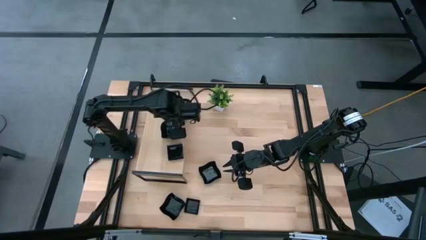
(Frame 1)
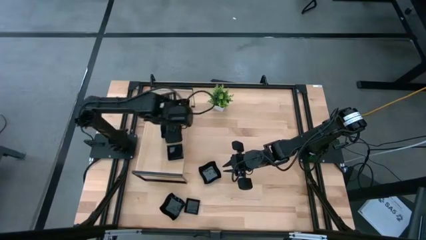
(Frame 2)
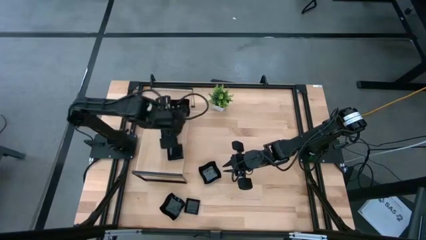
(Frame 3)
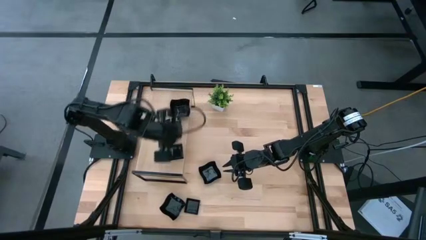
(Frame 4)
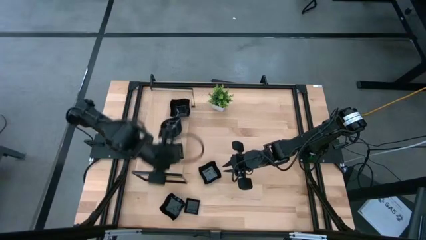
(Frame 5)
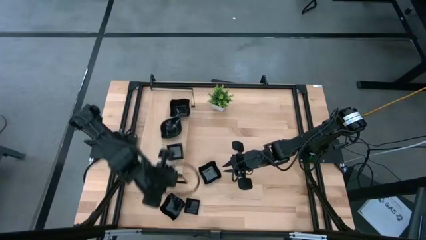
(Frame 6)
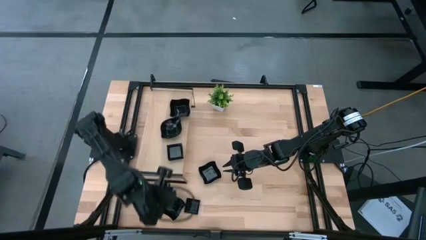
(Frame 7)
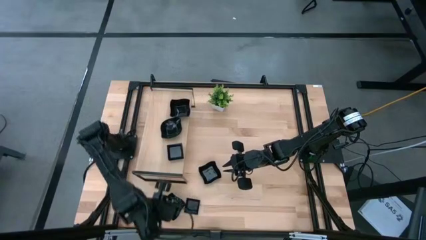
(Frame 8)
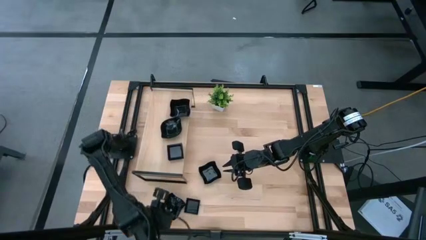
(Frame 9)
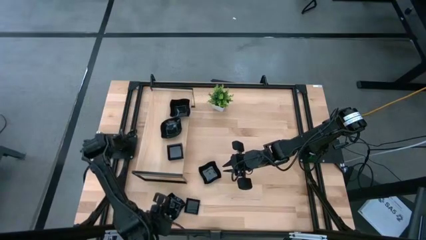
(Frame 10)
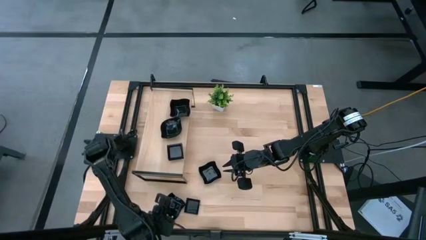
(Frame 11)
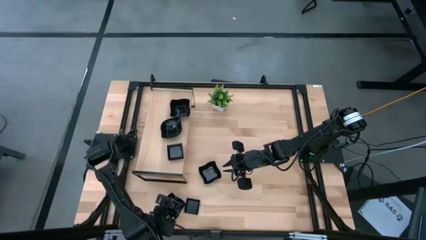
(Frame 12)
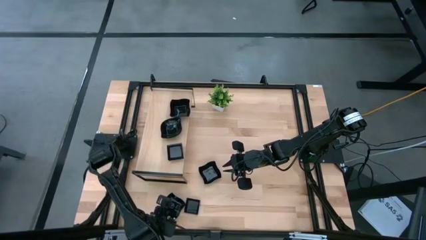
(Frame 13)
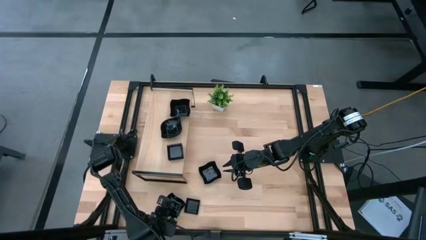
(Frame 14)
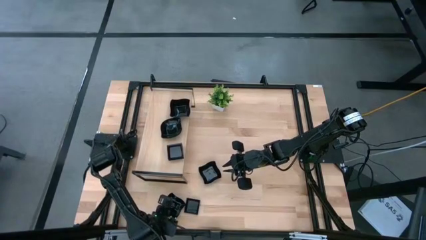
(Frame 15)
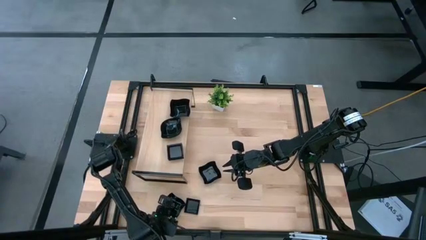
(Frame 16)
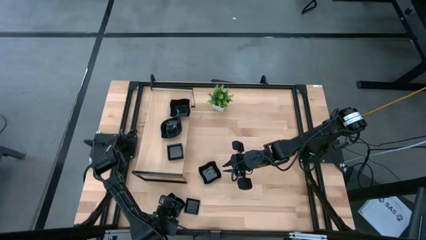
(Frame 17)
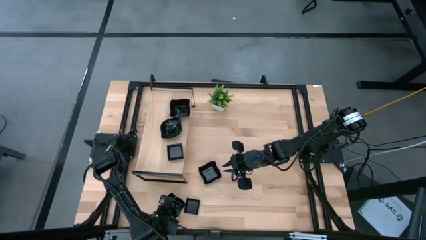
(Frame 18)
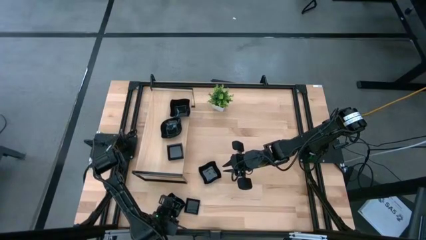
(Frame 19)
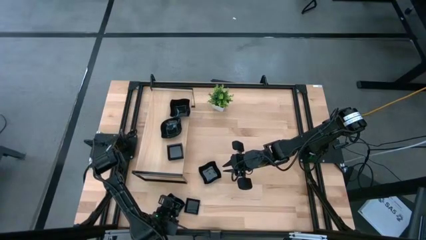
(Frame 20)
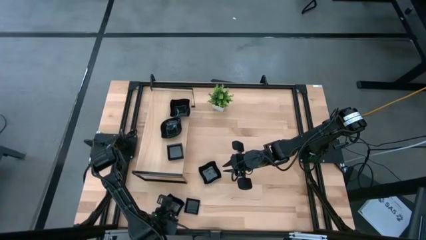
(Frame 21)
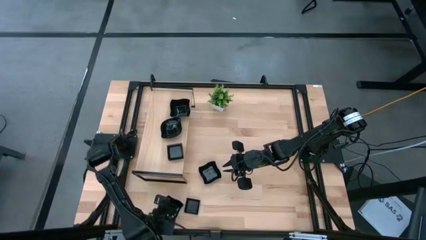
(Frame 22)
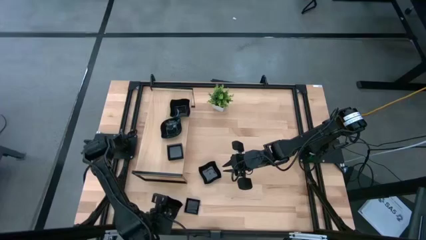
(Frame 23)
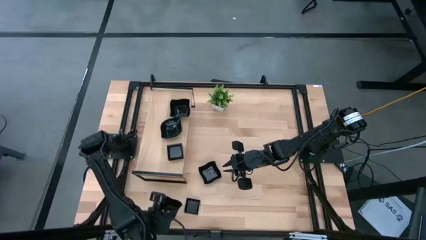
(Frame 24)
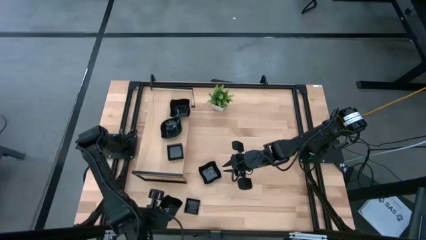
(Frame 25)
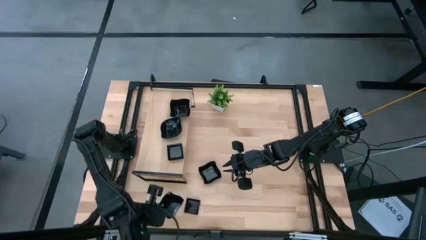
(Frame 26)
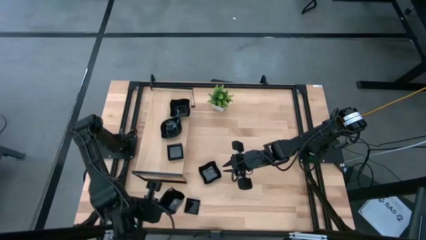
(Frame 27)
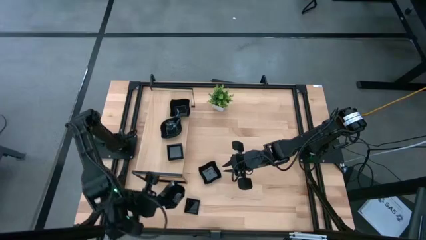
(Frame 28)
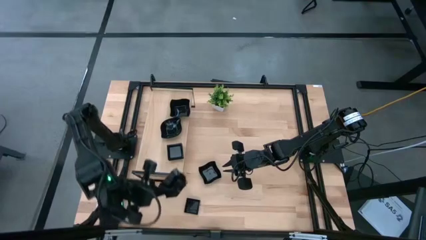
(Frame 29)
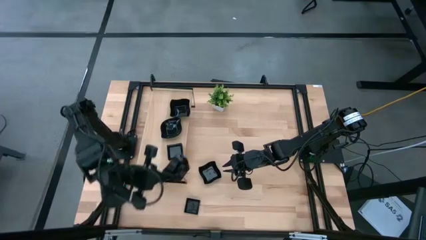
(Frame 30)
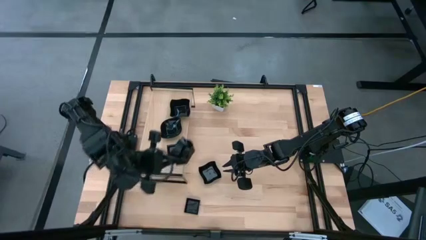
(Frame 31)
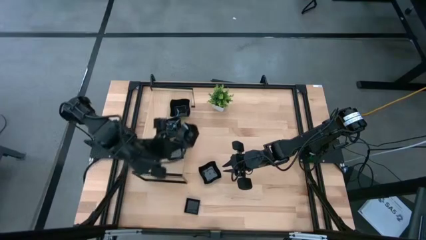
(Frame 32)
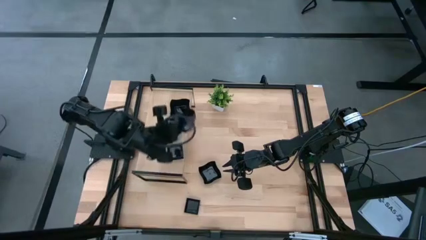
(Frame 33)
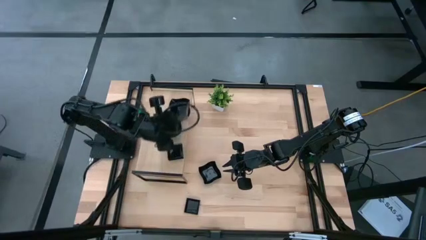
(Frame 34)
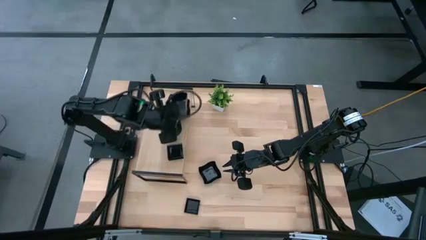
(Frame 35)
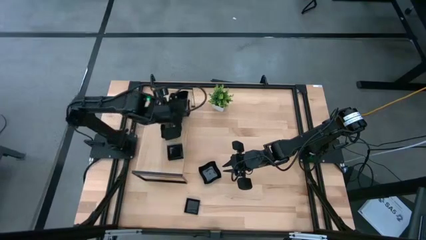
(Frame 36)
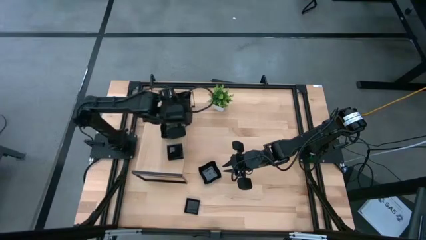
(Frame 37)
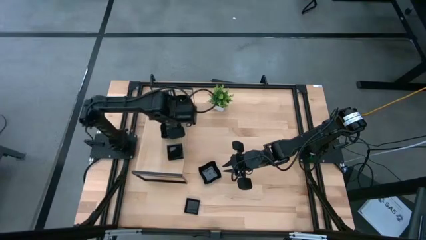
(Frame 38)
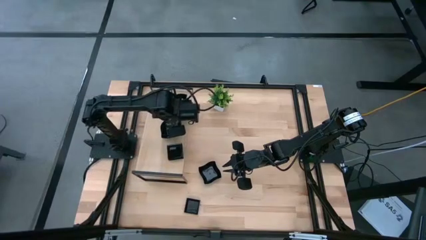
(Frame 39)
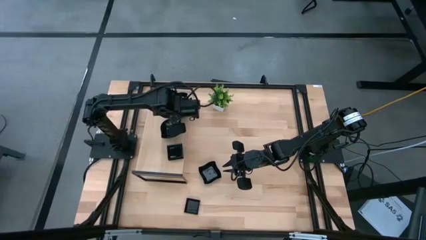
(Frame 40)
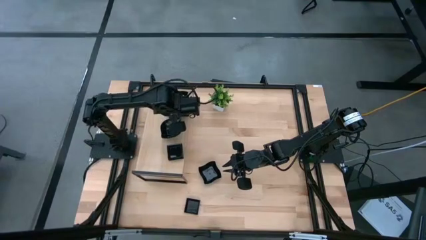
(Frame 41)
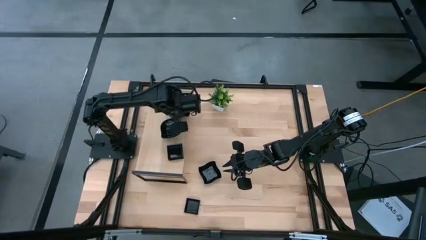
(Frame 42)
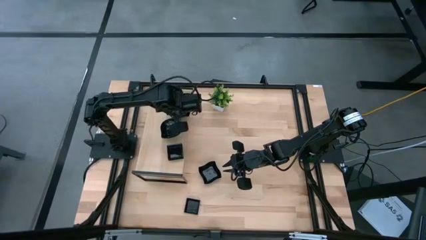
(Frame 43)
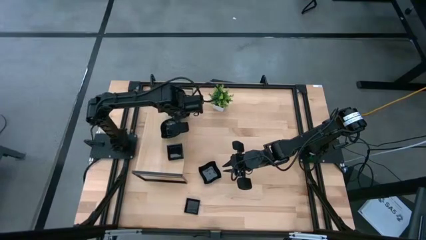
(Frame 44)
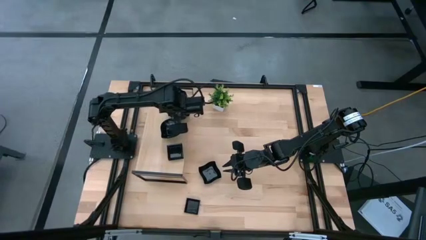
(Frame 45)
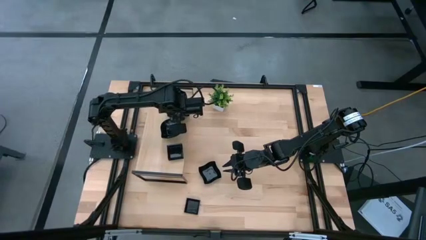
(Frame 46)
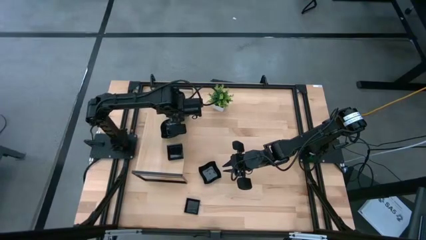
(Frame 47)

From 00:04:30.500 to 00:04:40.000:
Task: Pick & Place Mini shaped plates
Stack the black distorted square plate on top of the black distorted square plate on the shelf

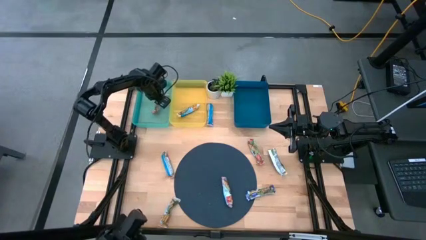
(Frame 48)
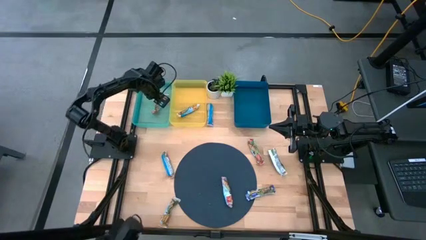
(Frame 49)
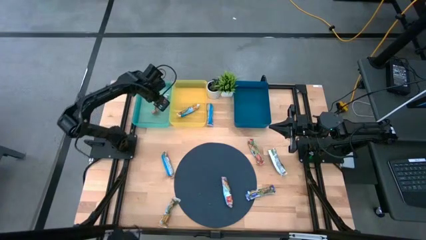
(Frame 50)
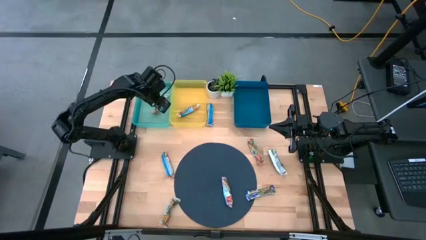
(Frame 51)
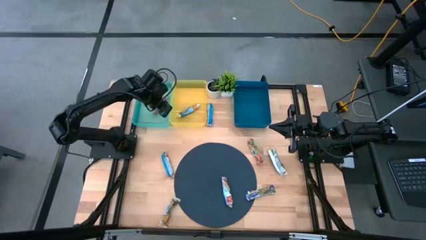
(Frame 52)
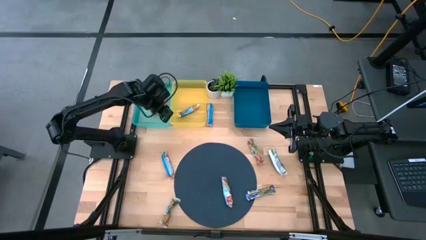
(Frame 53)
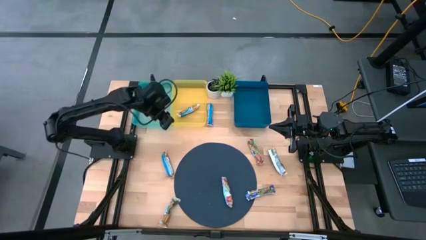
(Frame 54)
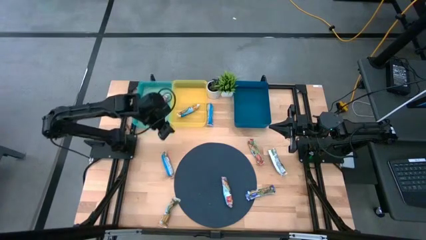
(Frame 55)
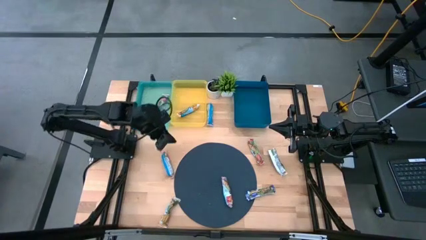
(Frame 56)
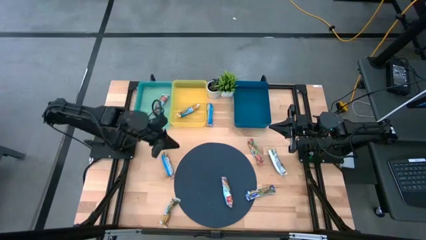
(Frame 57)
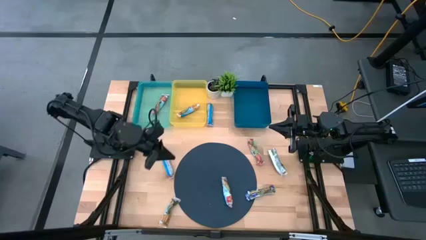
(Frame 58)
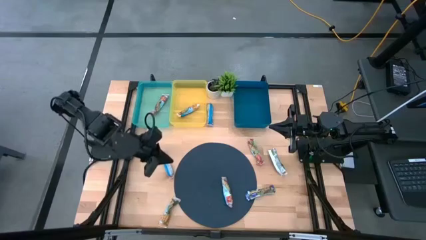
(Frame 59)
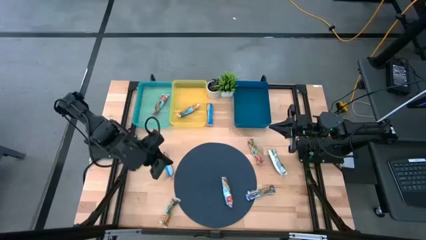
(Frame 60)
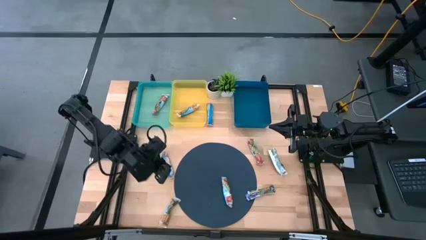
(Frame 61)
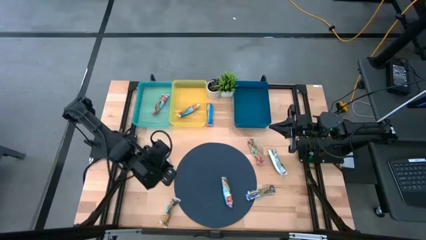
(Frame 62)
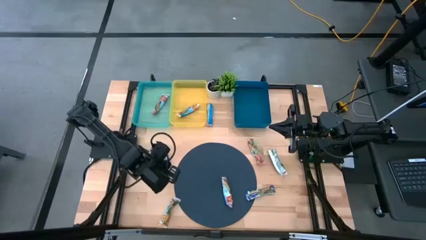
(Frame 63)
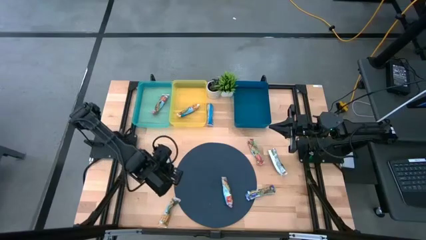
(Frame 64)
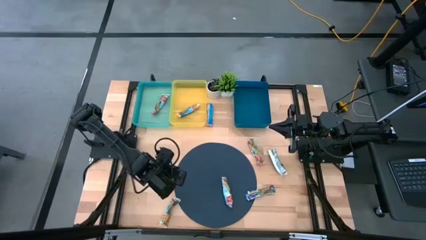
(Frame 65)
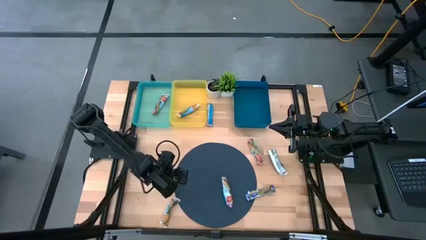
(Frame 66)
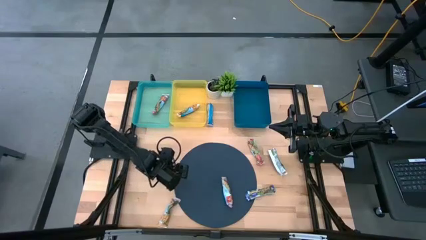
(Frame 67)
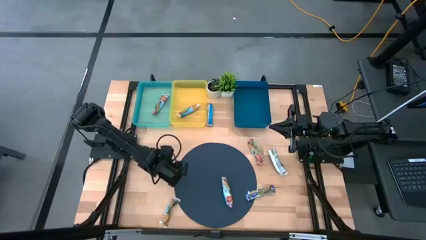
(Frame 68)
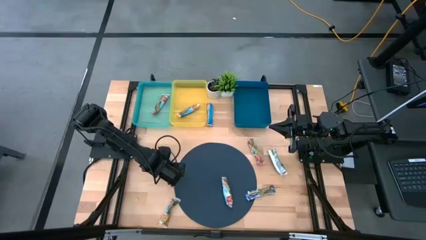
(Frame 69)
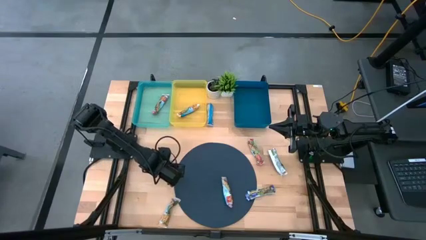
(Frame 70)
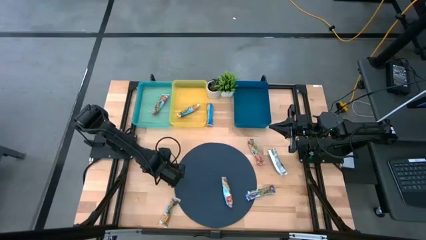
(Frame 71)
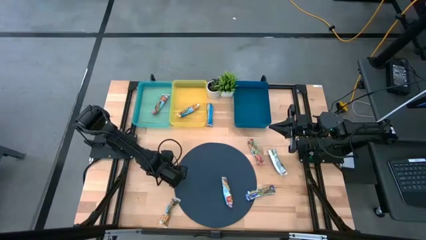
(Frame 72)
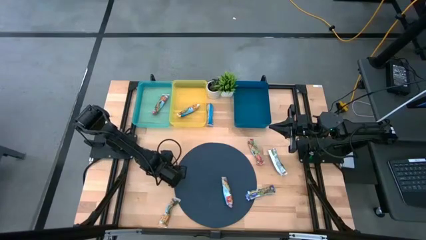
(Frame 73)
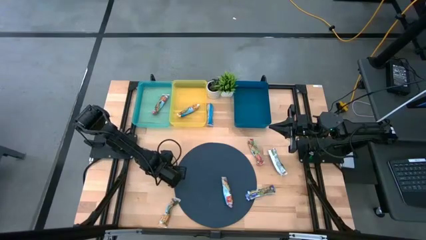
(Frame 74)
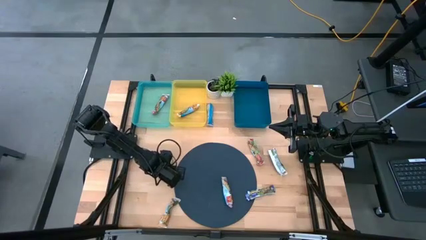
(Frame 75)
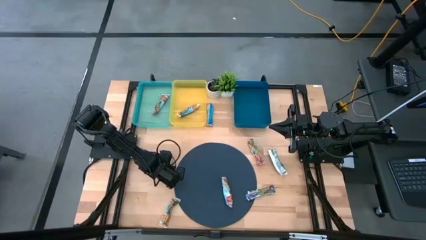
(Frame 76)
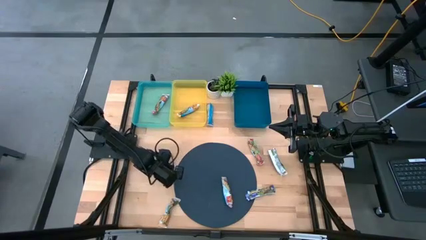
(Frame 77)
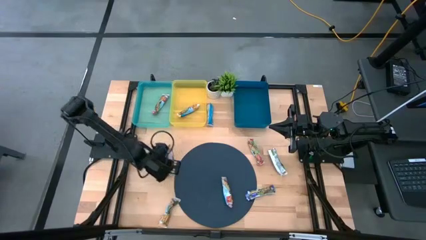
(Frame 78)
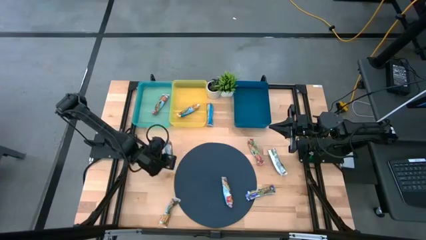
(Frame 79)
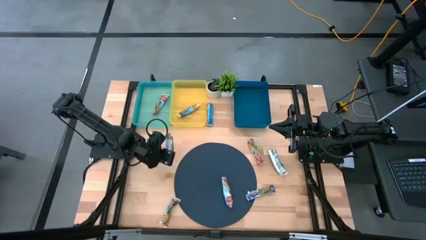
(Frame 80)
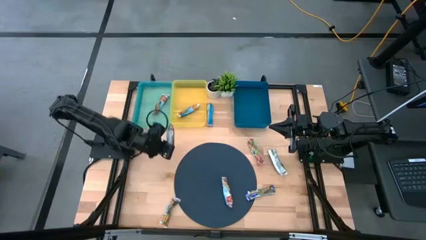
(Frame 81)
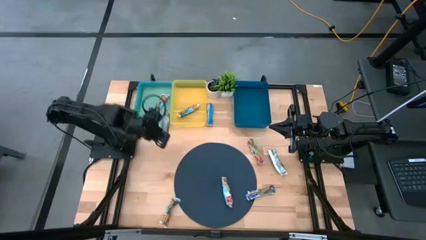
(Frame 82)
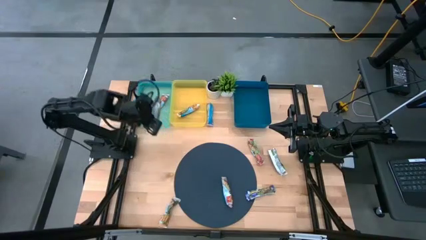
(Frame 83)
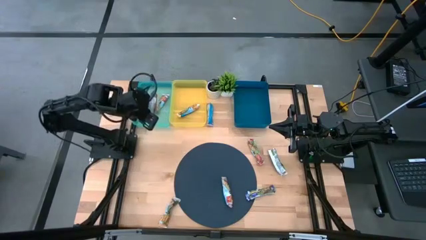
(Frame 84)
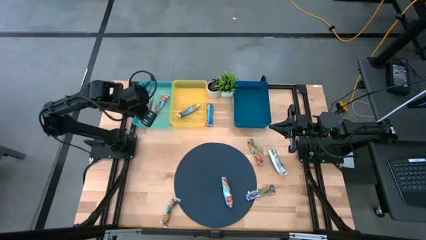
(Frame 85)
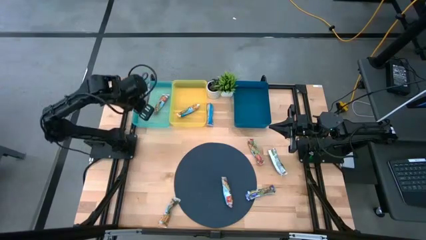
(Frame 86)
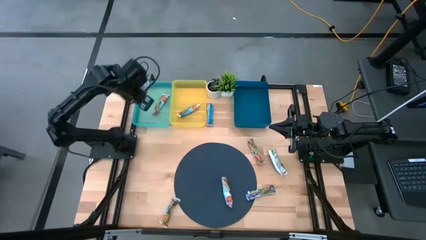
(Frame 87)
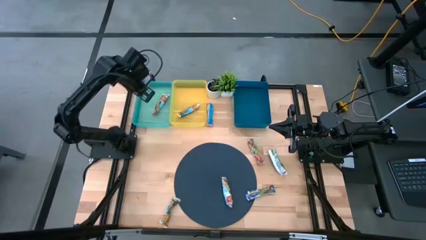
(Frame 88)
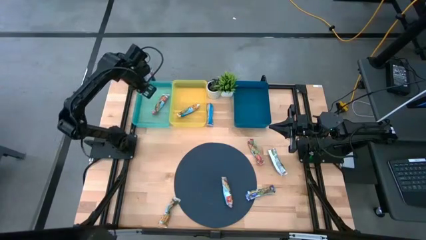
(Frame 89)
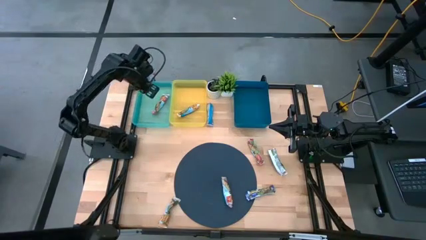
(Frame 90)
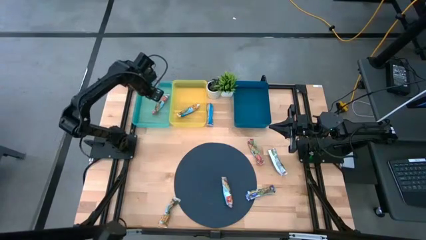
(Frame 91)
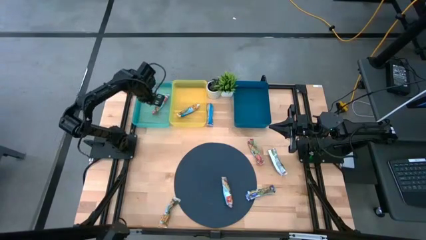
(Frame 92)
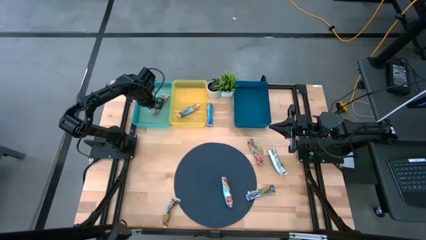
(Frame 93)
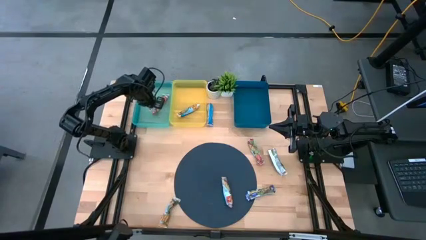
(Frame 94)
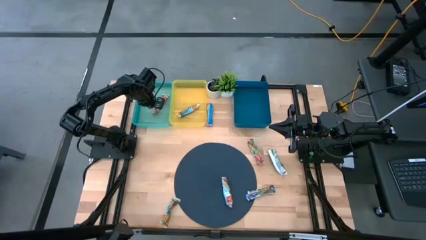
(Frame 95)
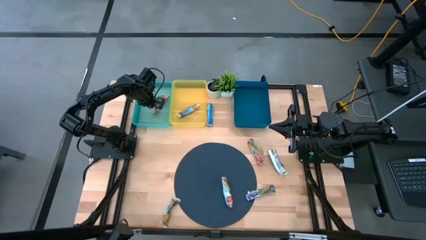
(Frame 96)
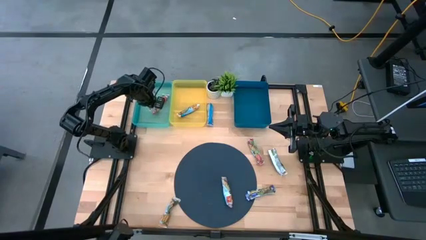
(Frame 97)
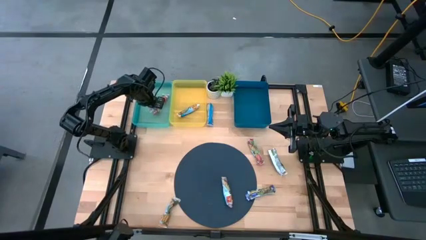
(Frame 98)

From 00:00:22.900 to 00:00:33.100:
Task: Pick and place Granola Bars by type
Put the red granola bar into the green bin
